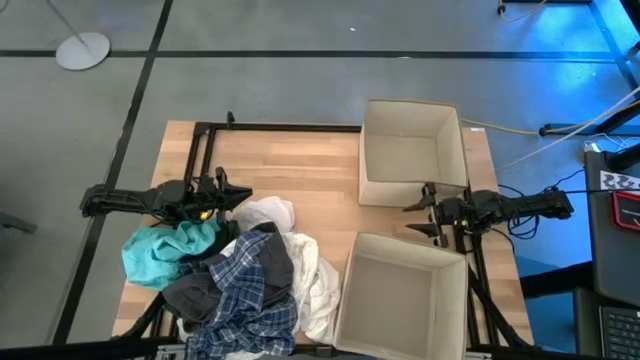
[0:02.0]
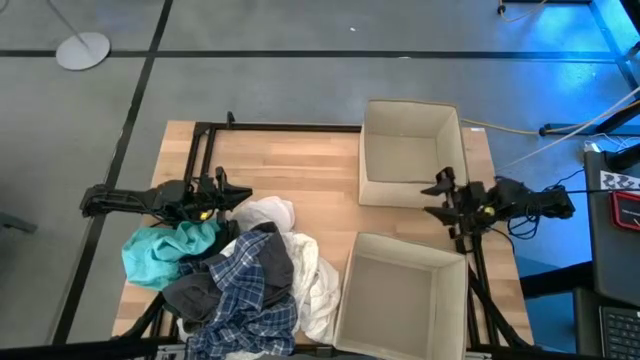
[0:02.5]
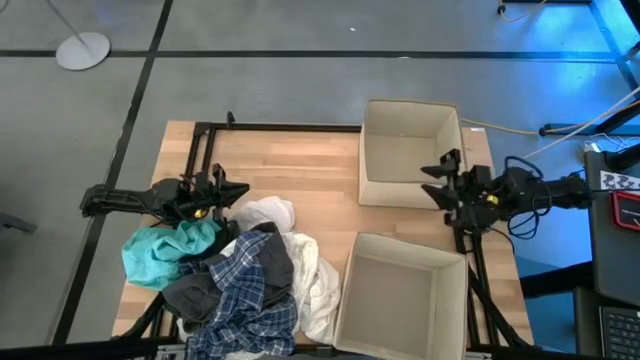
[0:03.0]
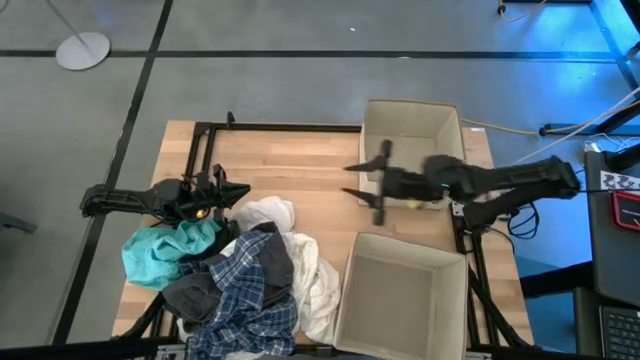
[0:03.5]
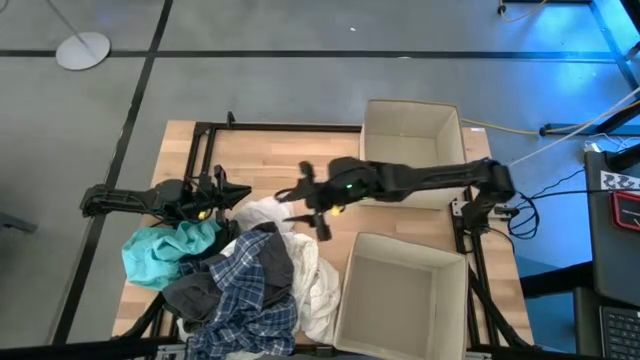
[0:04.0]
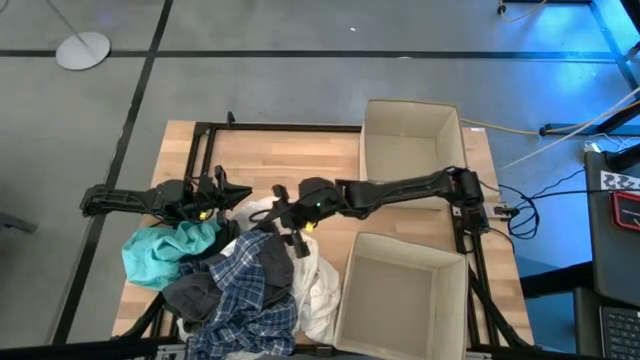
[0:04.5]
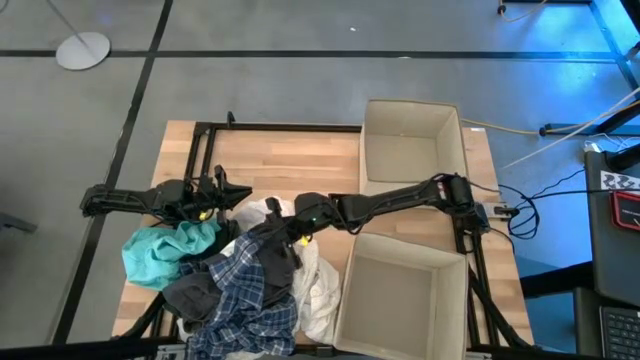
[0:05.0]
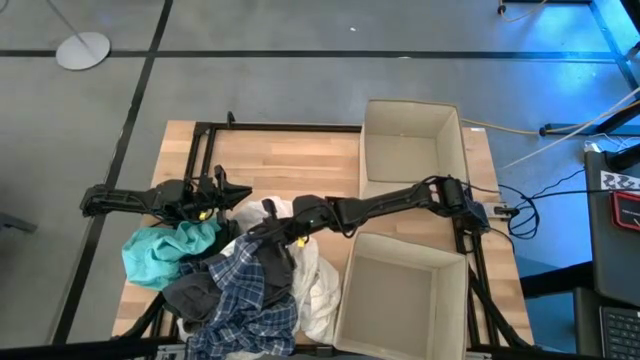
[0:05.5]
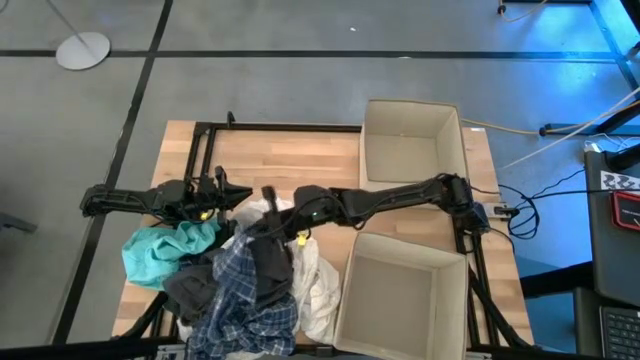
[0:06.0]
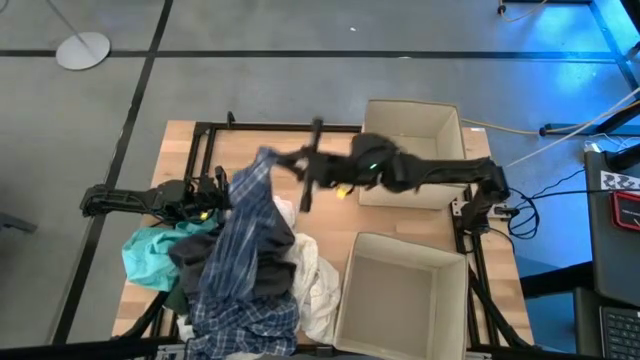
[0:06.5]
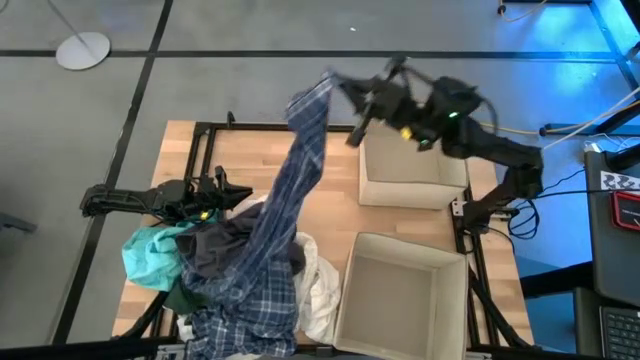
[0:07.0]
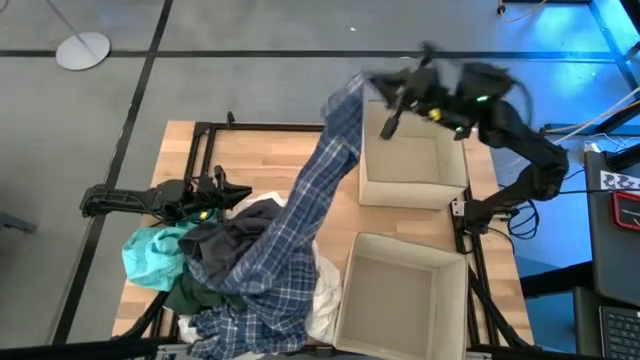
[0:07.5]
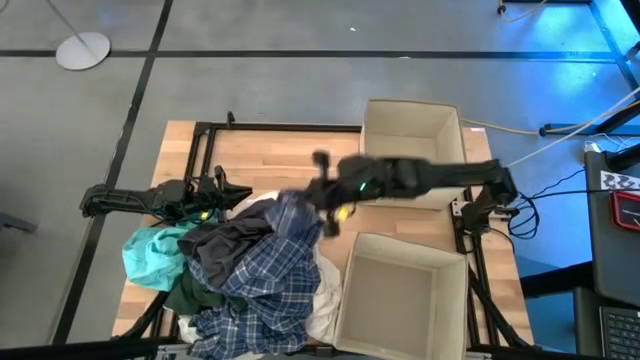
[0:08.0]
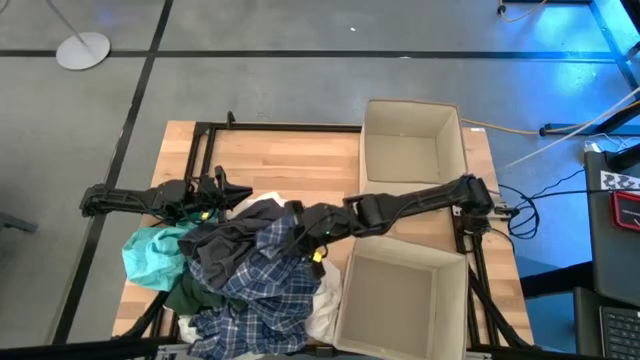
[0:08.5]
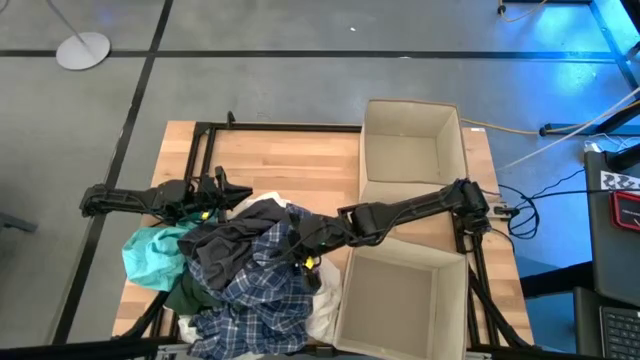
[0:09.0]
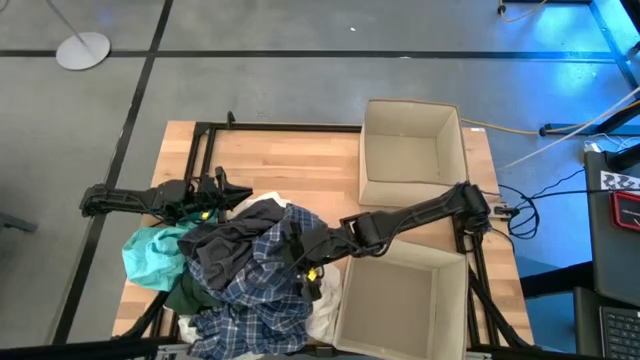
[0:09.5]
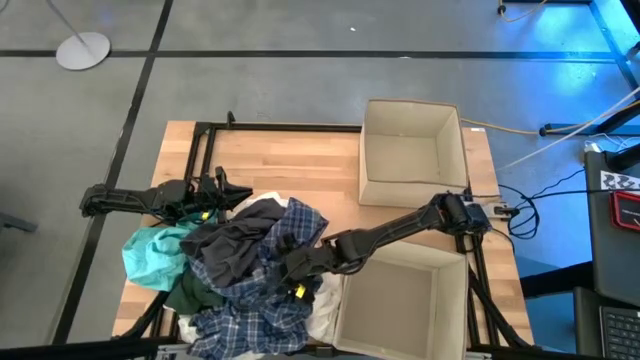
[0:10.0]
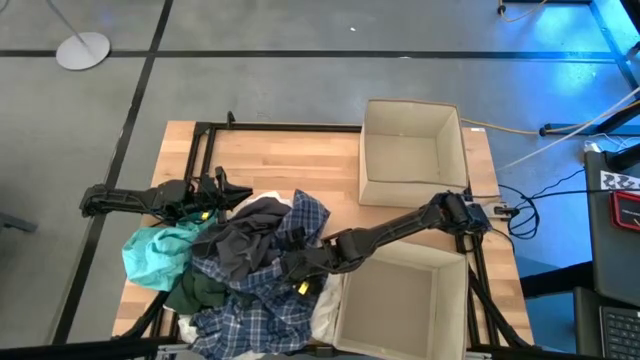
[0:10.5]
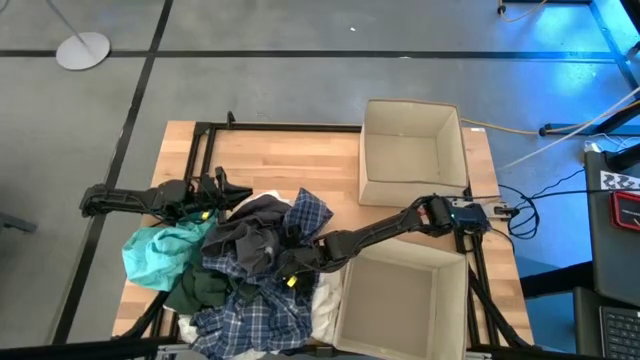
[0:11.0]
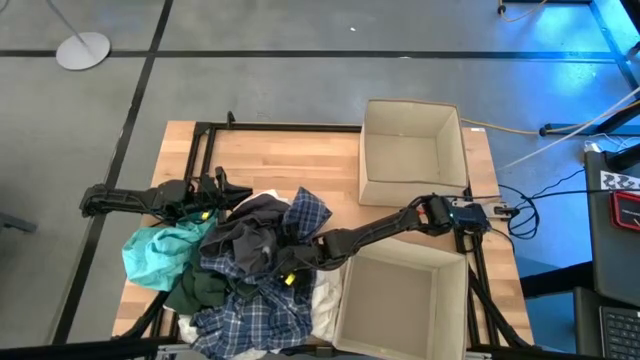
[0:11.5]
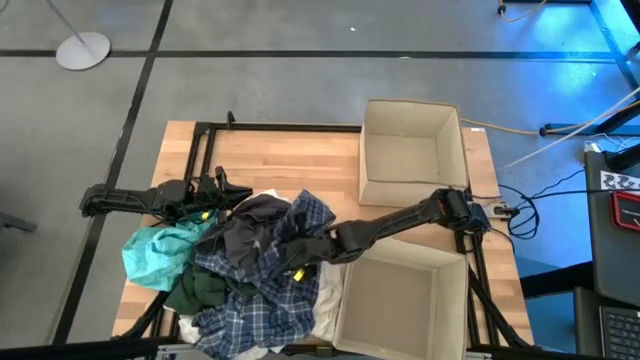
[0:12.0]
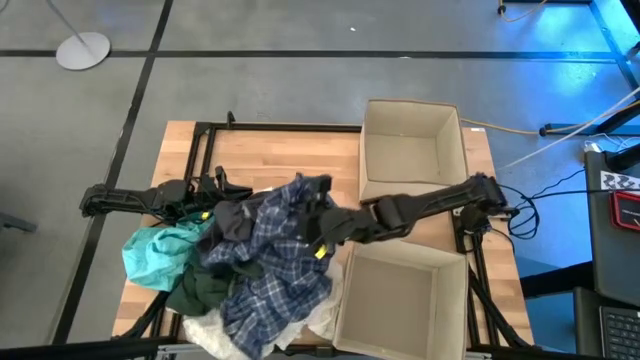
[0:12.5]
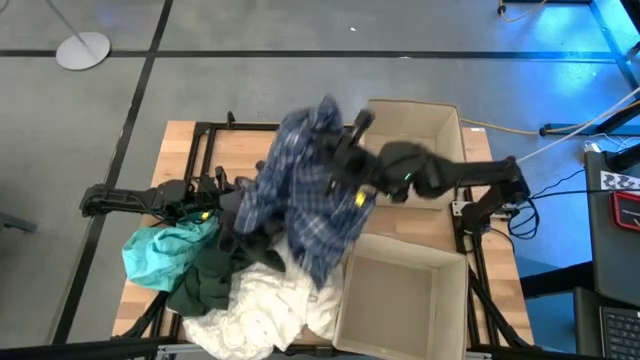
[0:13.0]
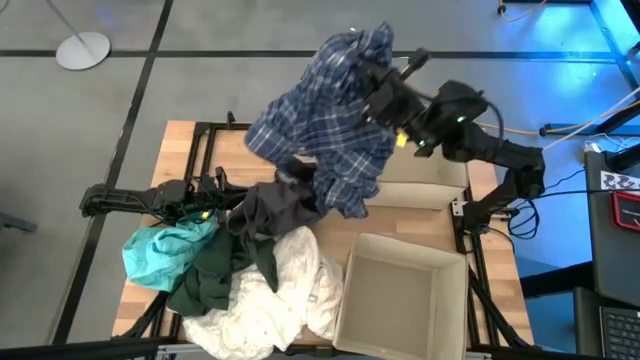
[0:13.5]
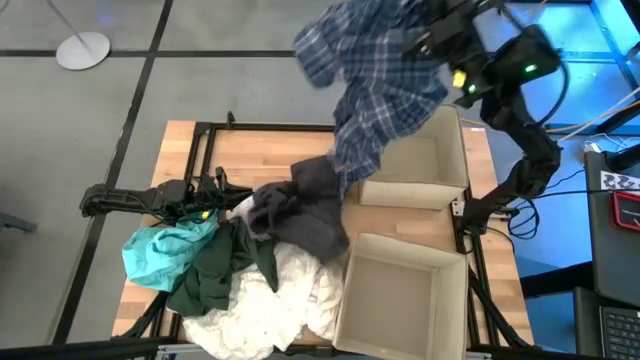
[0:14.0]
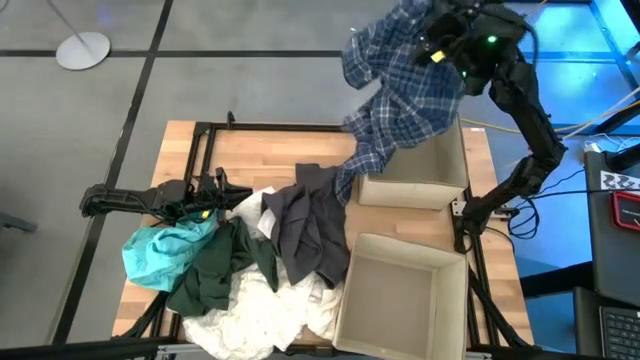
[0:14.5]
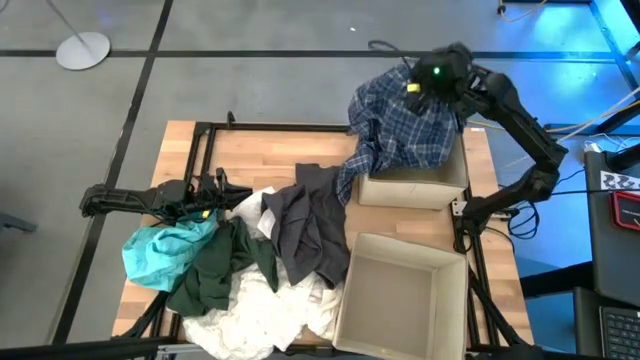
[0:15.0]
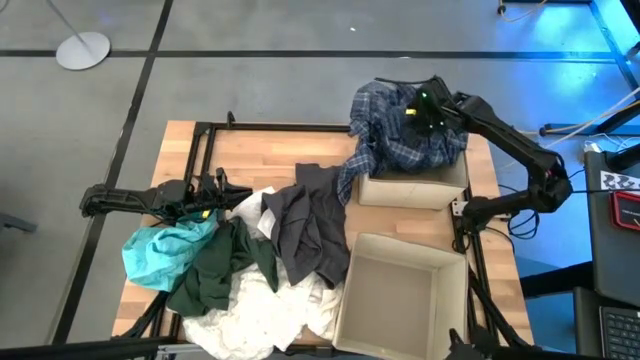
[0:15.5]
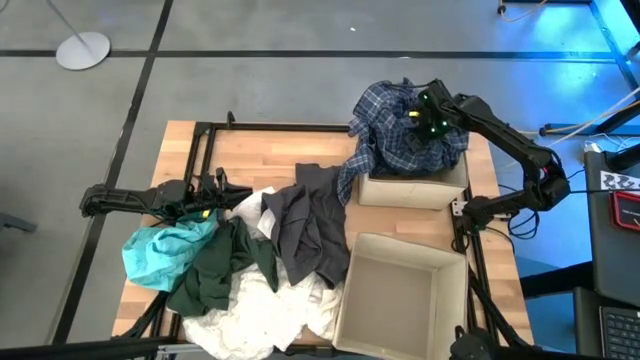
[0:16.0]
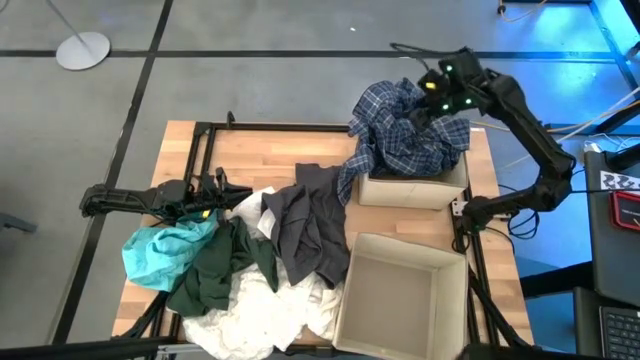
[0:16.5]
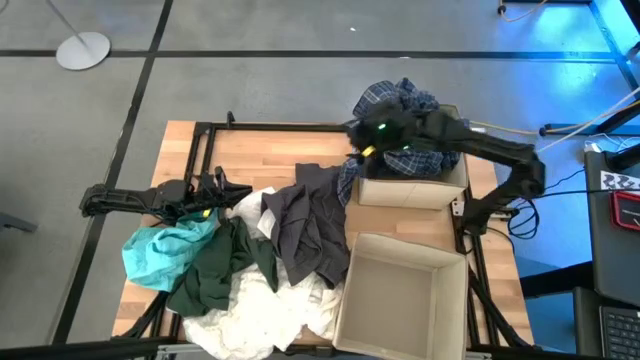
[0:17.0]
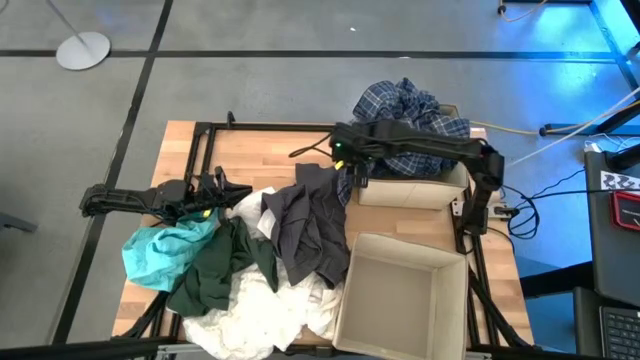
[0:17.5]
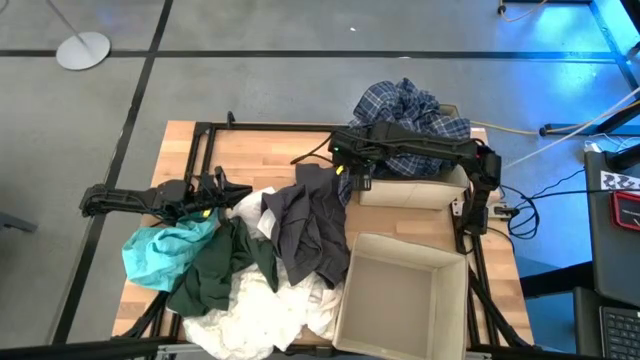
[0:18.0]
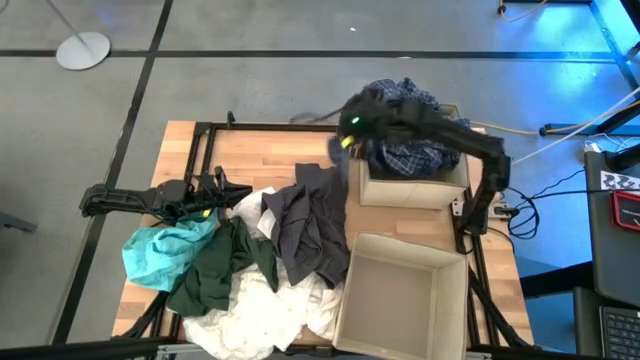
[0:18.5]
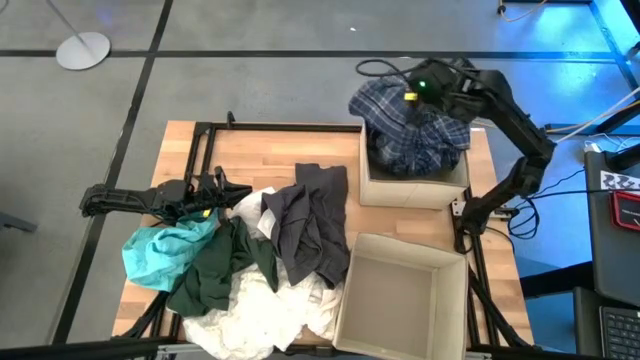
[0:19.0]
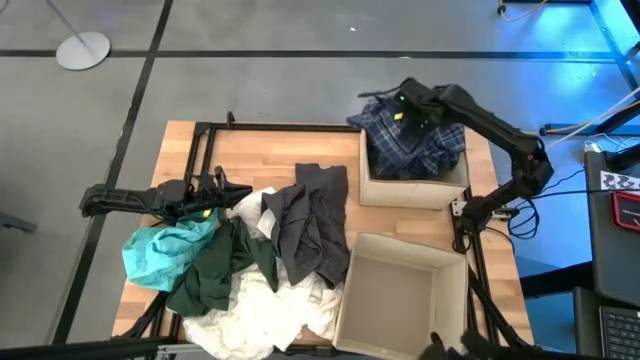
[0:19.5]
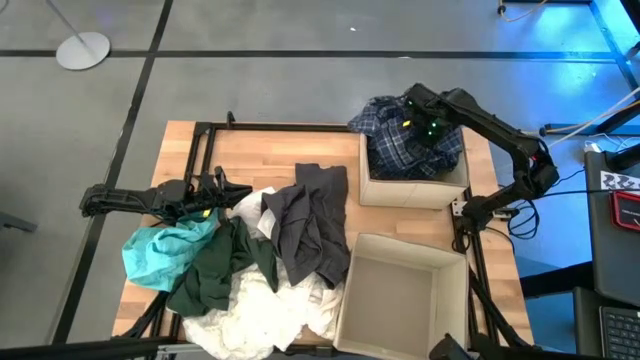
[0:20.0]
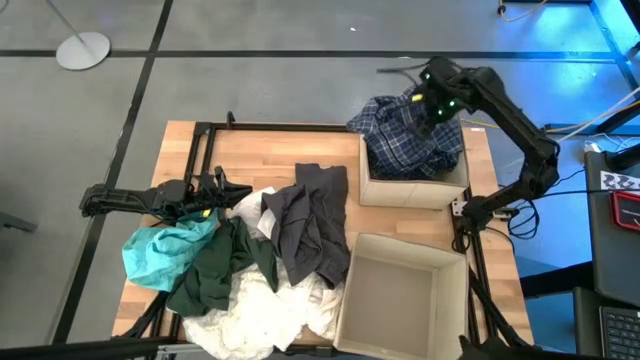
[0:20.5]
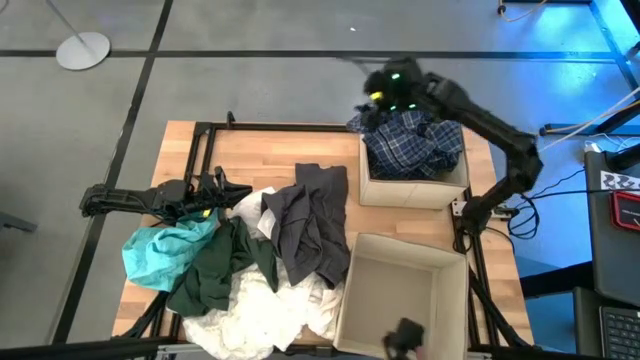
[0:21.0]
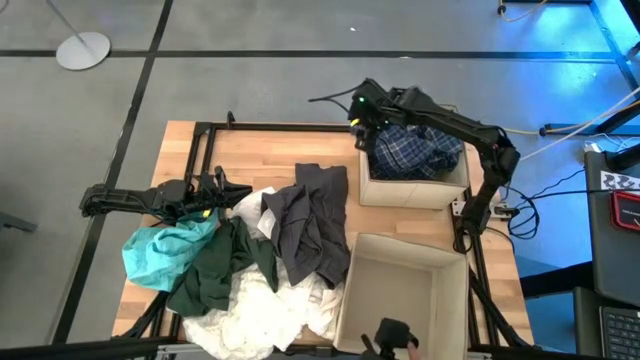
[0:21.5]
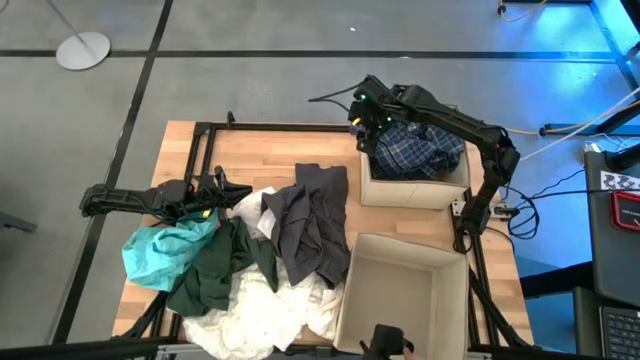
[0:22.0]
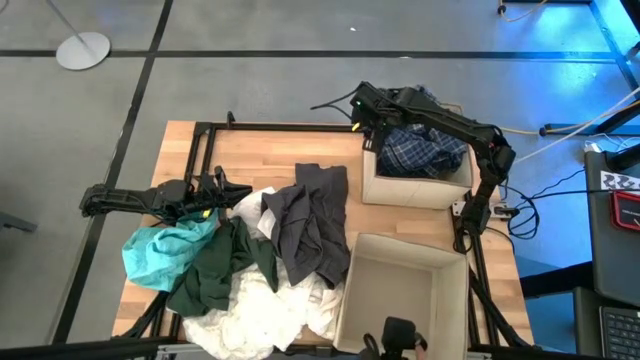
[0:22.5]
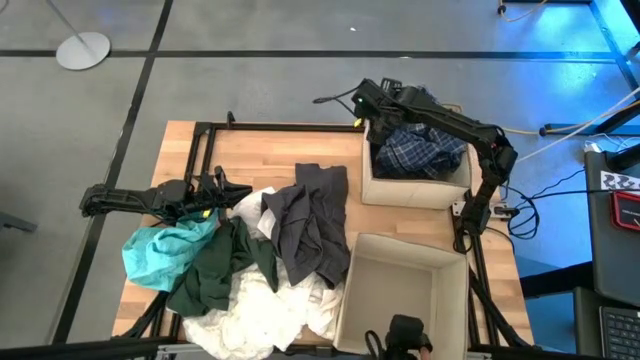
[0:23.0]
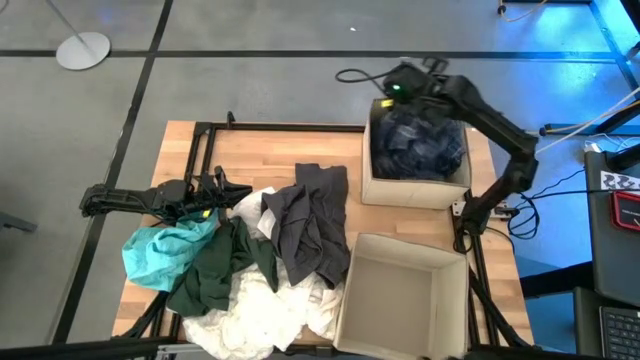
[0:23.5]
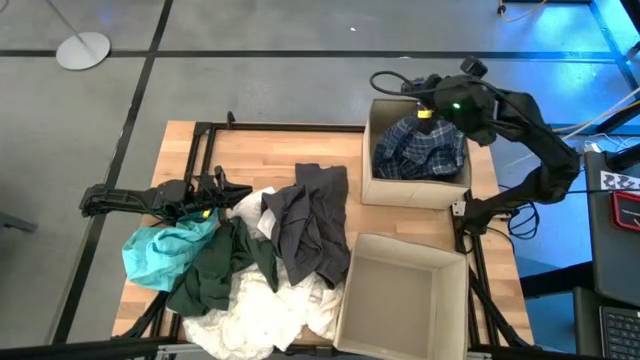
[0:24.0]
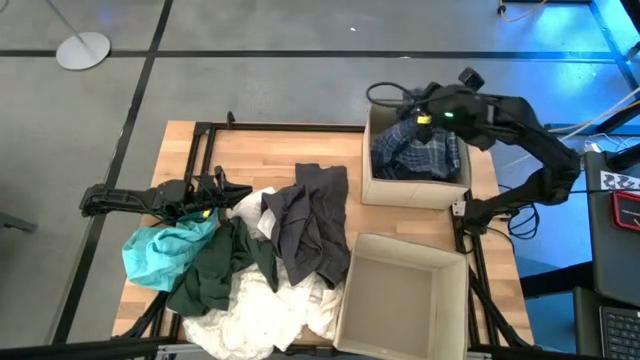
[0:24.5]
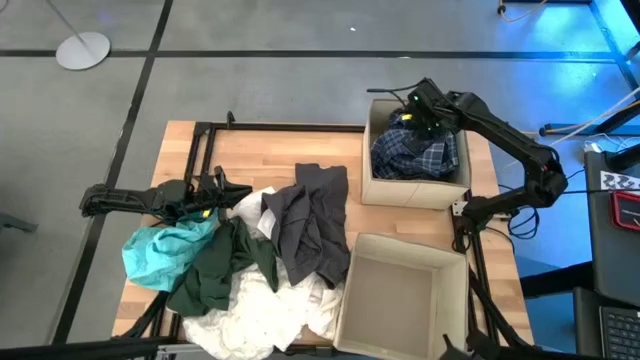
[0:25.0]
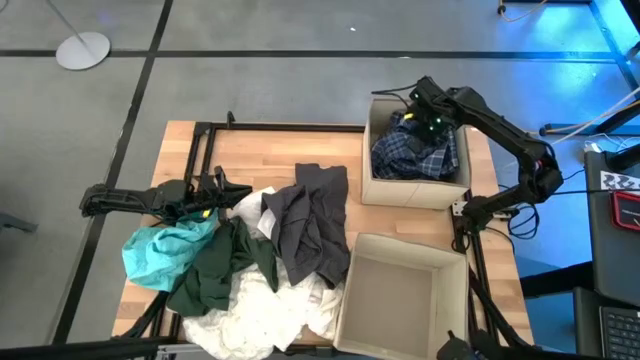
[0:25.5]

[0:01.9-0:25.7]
Task: Sort clothes
Put the blue checkered long sleeve shirt into the top laundry organizer
